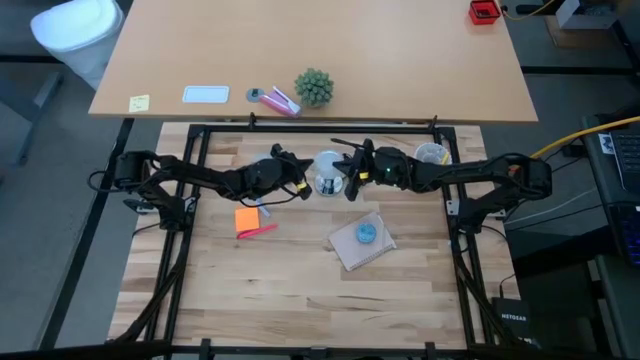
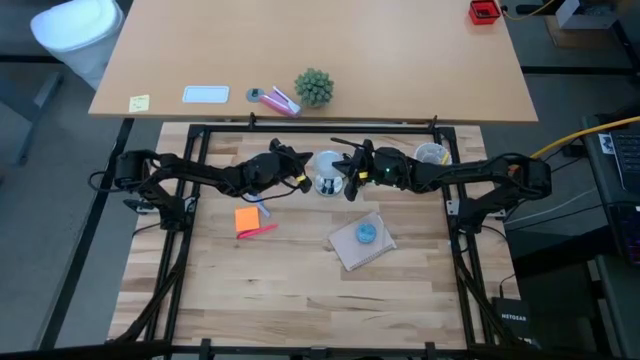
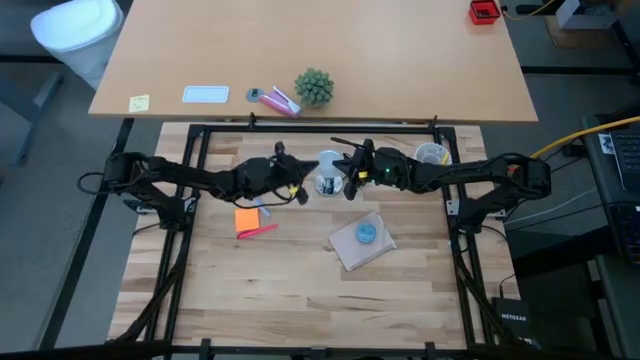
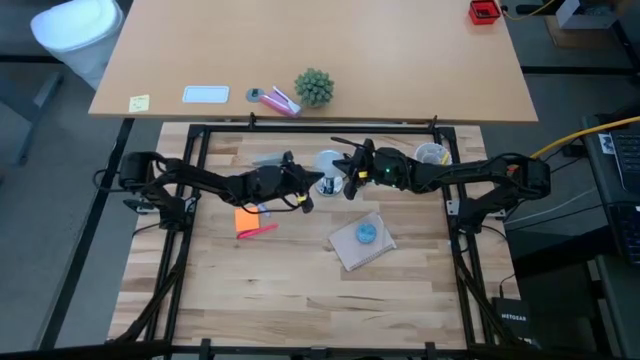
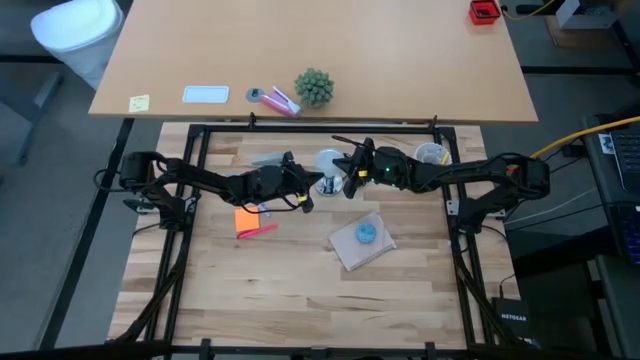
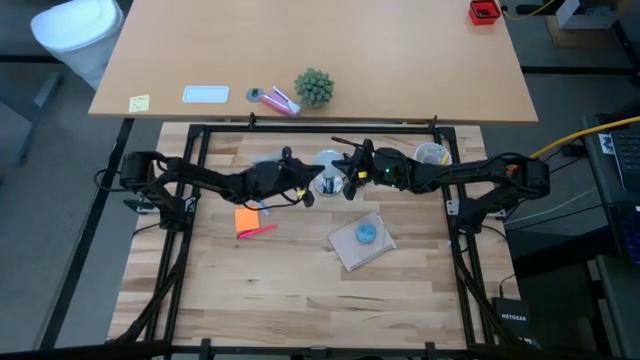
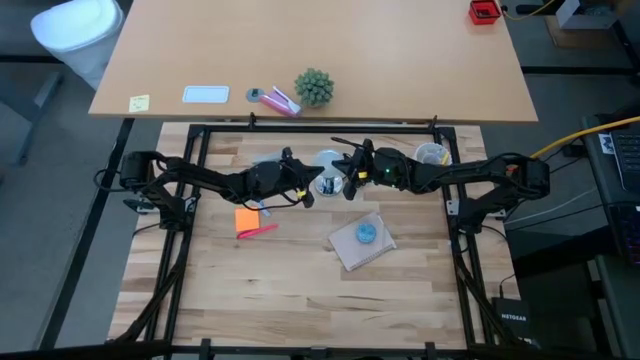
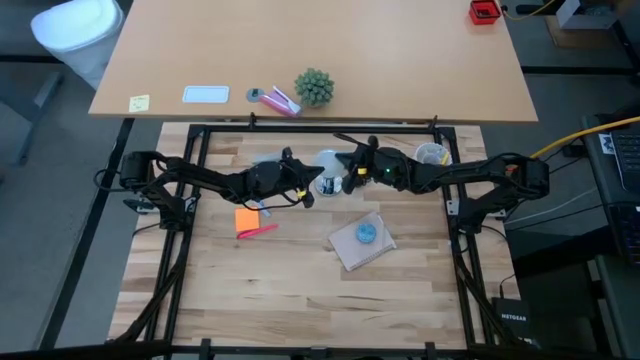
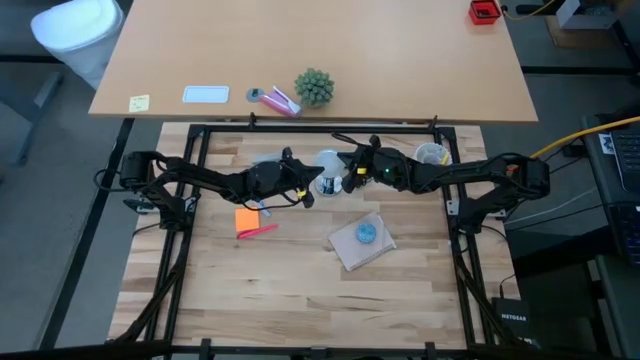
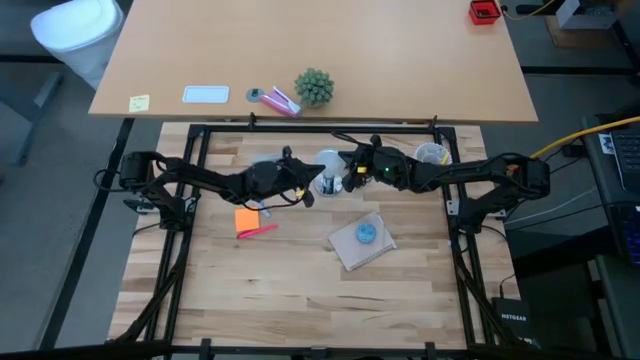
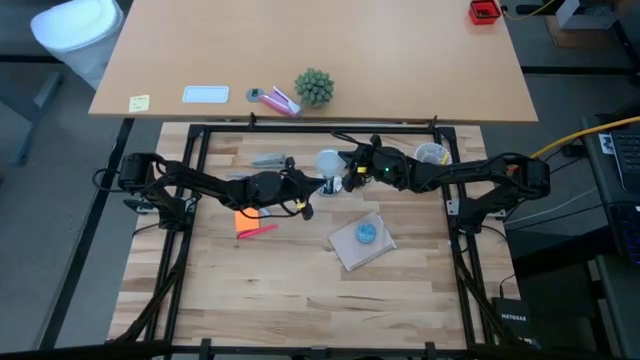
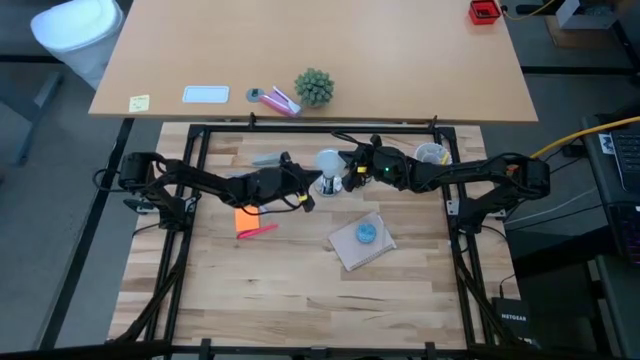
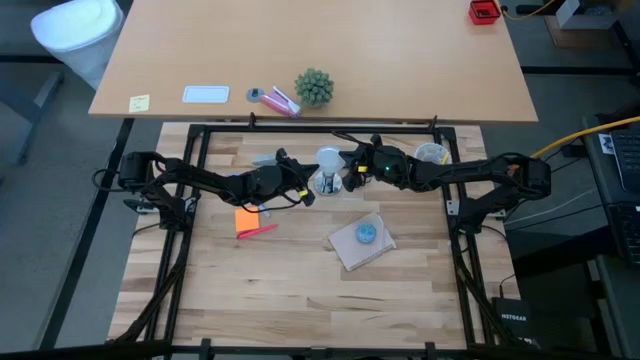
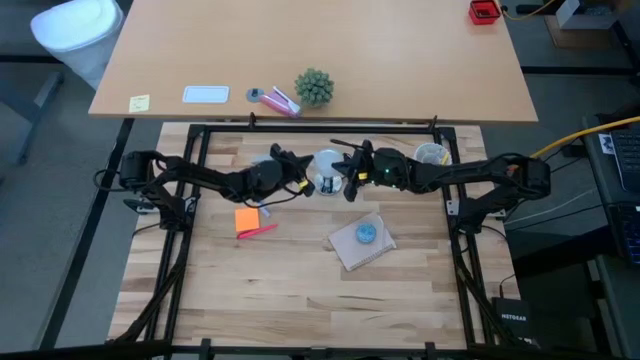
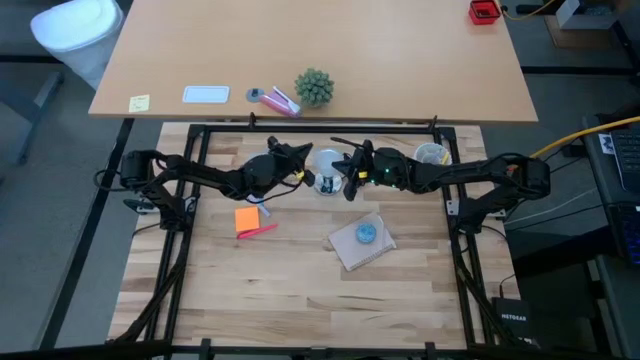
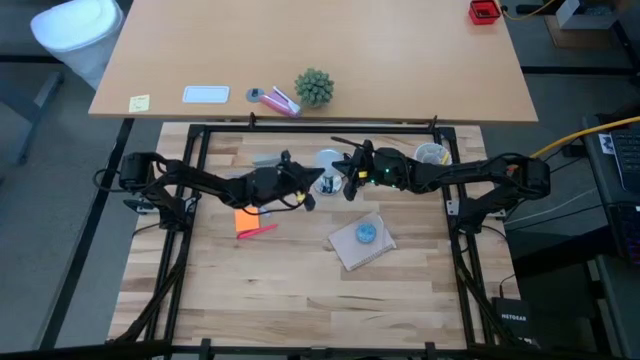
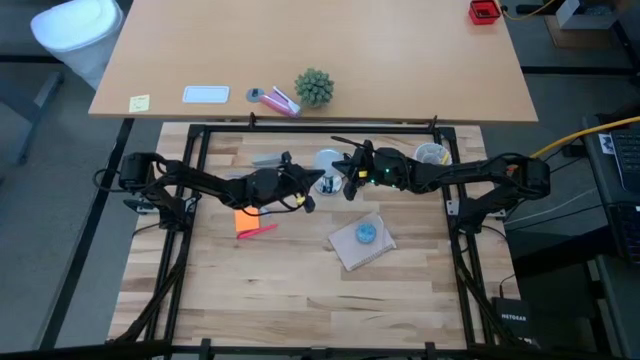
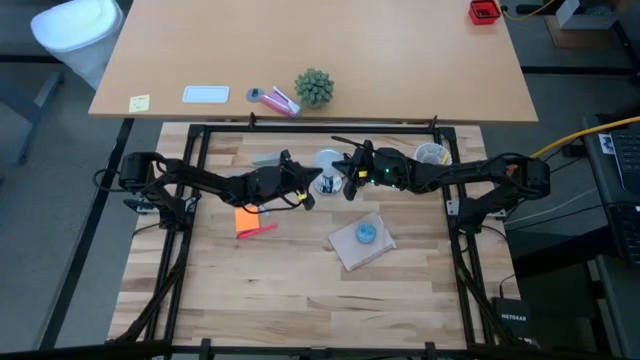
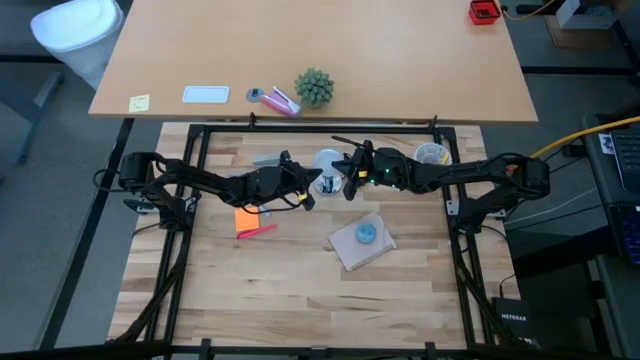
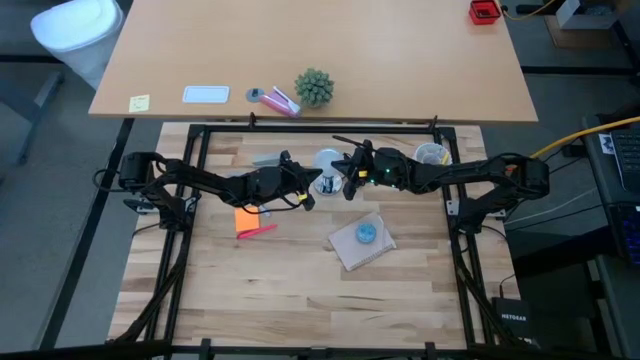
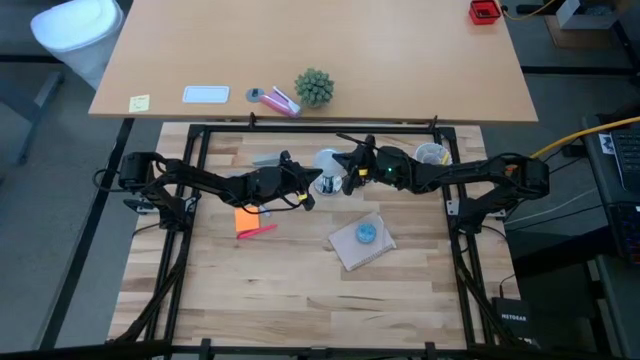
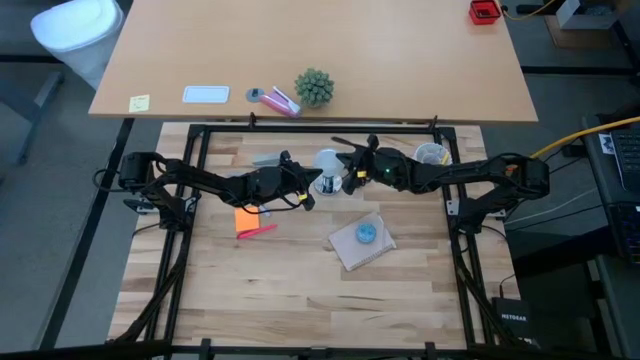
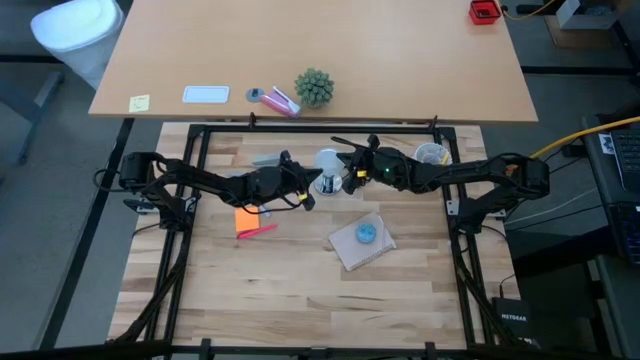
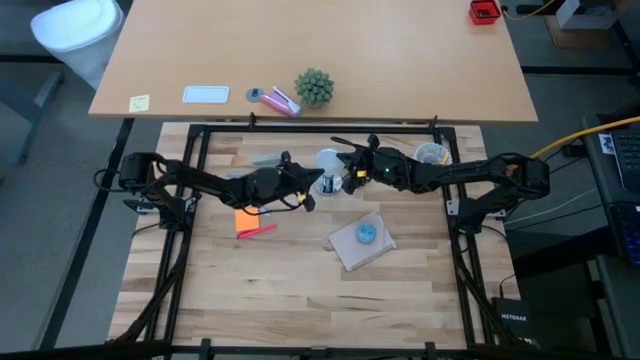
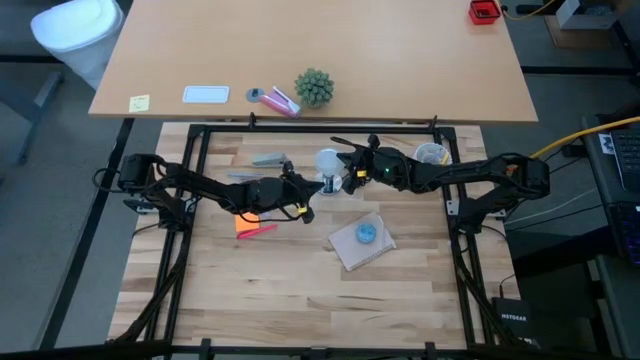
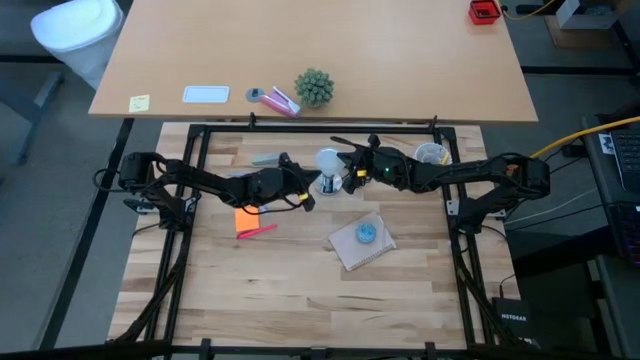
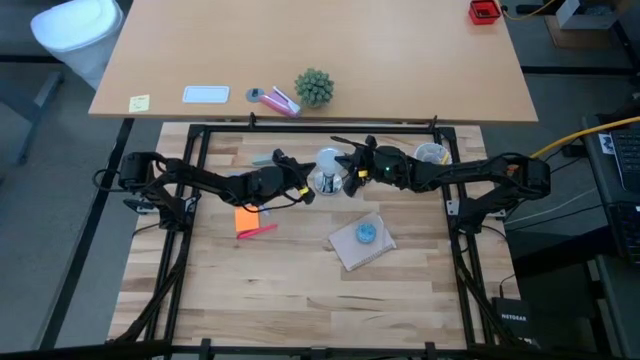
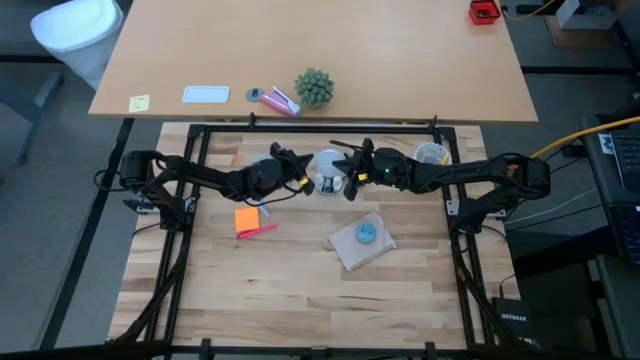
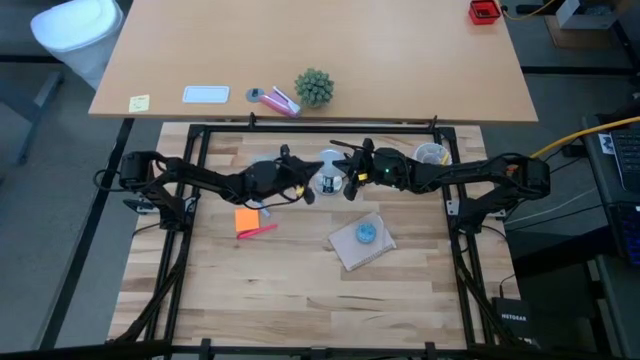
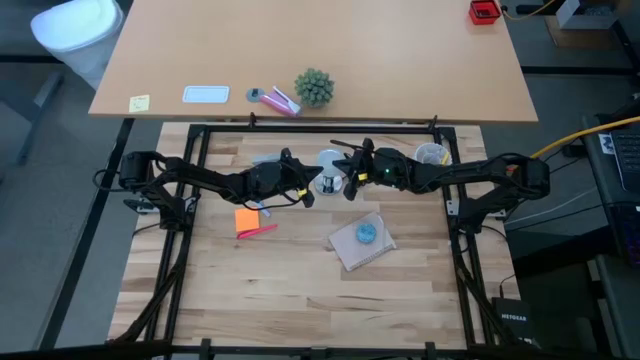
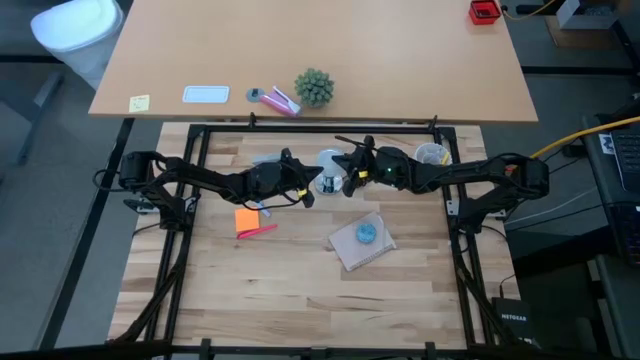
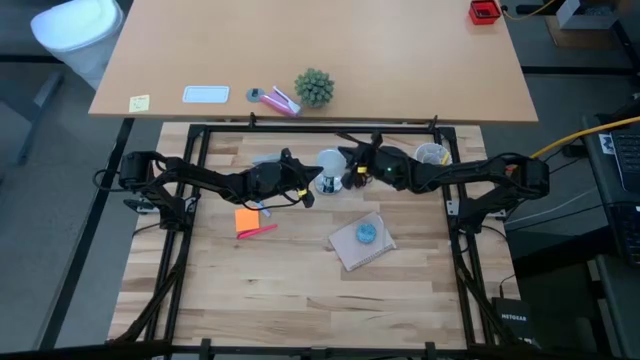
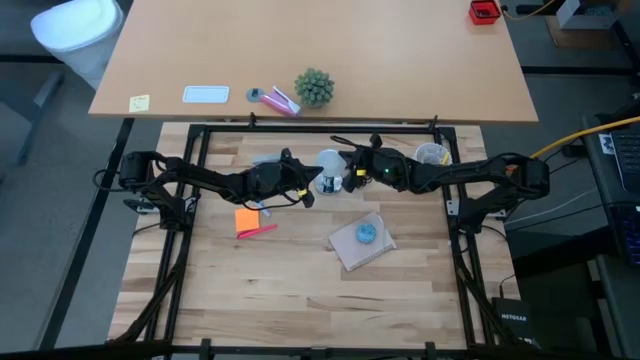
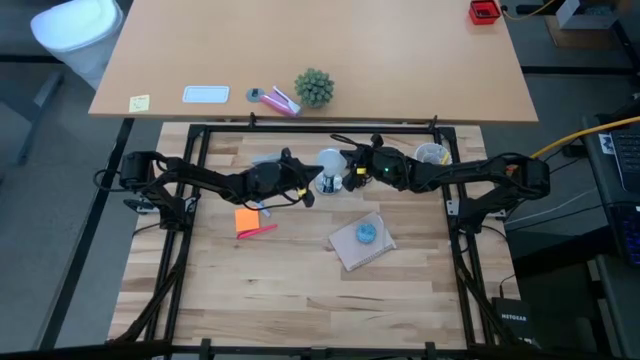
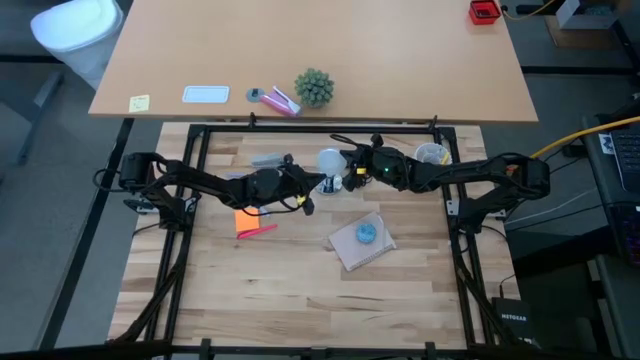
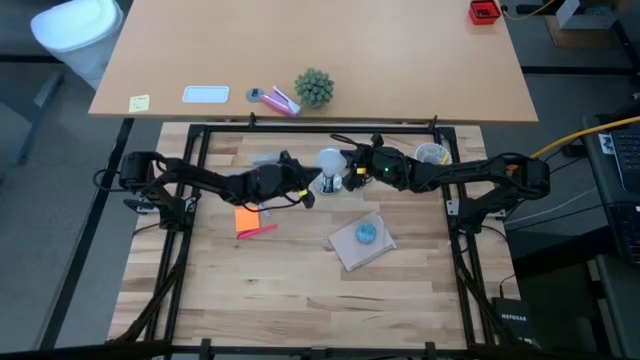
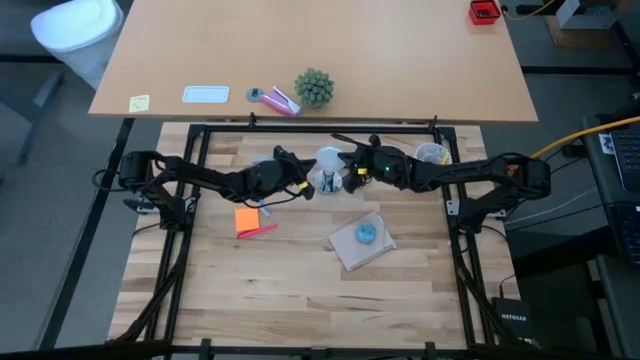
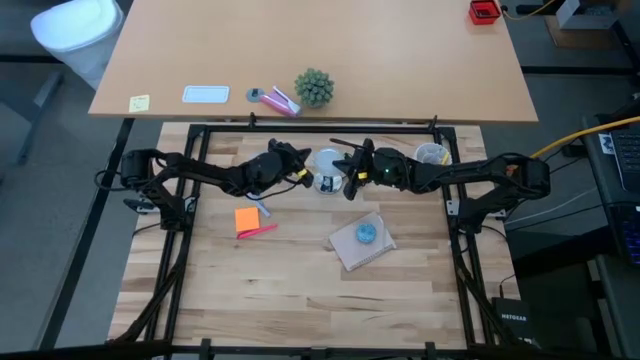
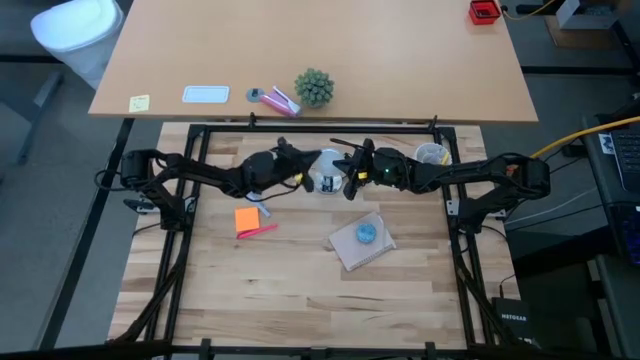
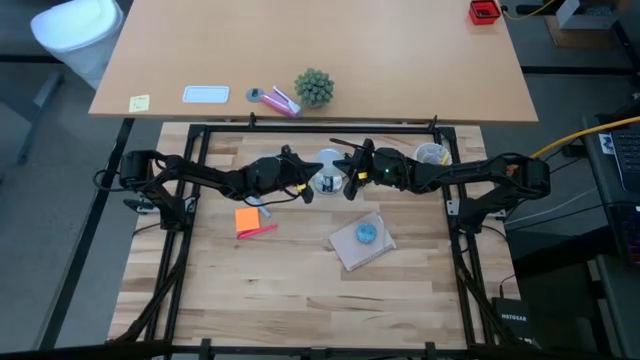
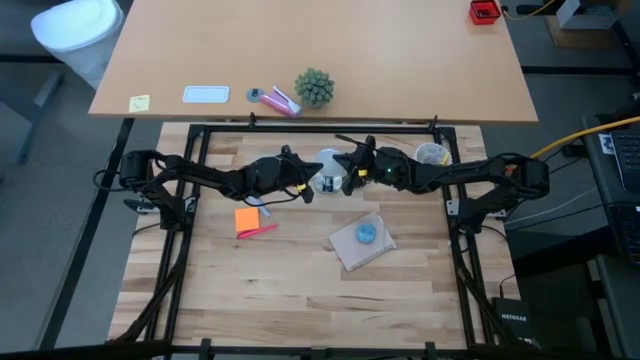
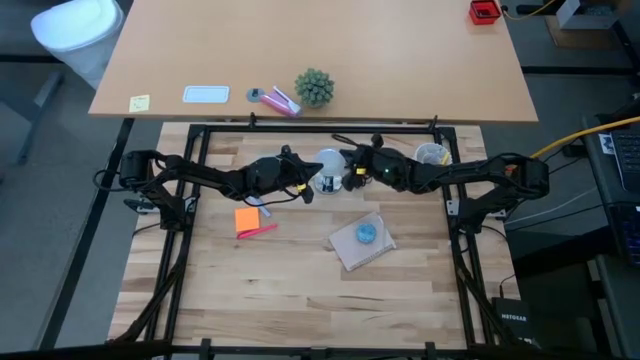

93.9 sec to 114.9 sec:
Task: Screw lightbulb
Insert the lightbulb into the lamp
